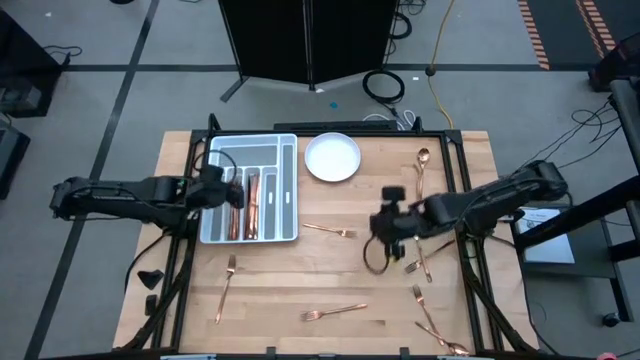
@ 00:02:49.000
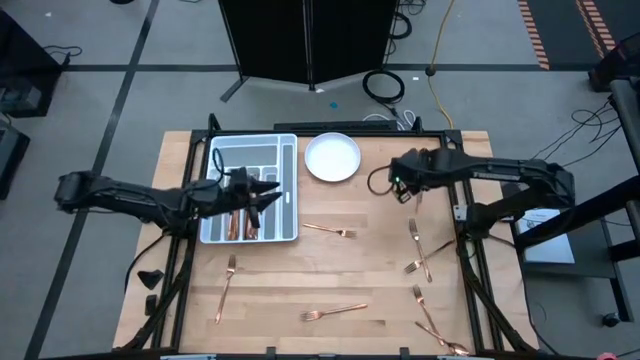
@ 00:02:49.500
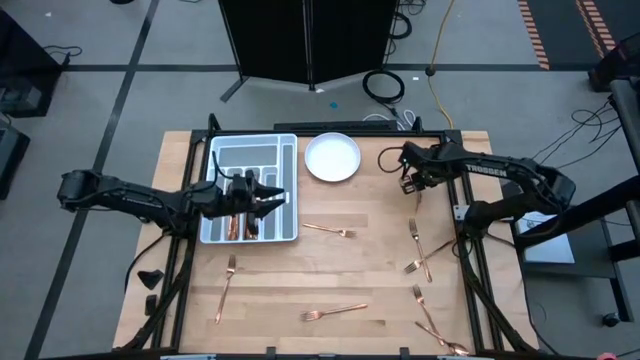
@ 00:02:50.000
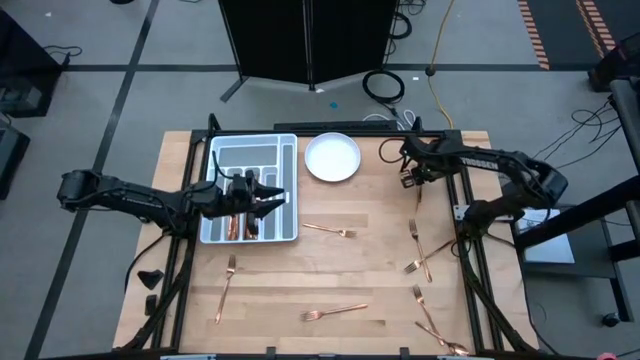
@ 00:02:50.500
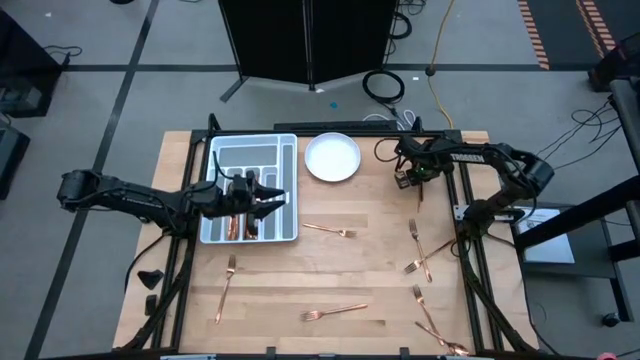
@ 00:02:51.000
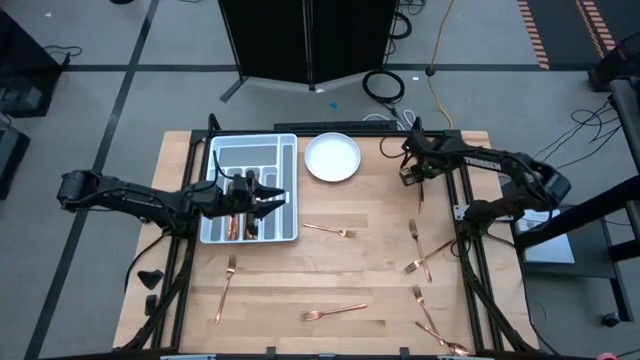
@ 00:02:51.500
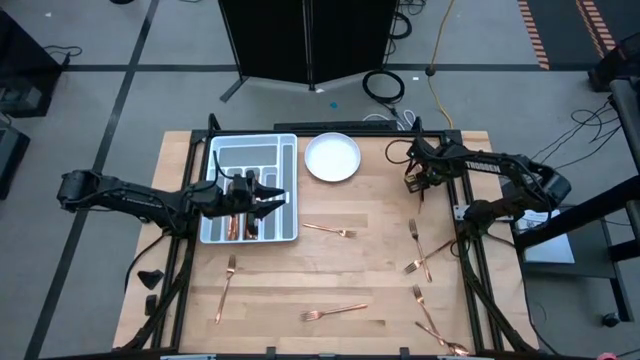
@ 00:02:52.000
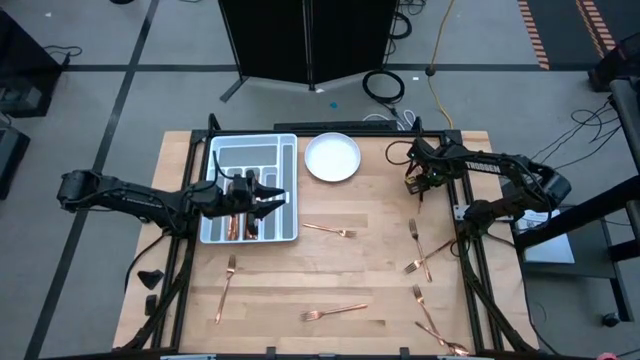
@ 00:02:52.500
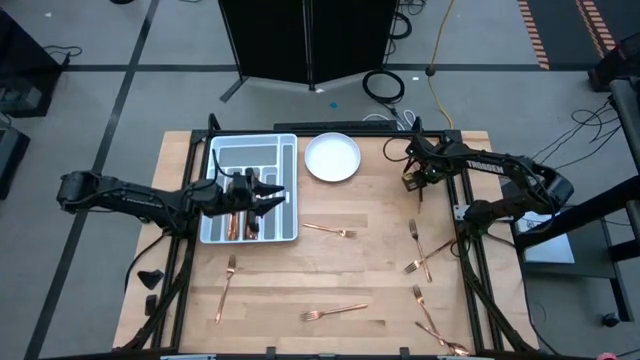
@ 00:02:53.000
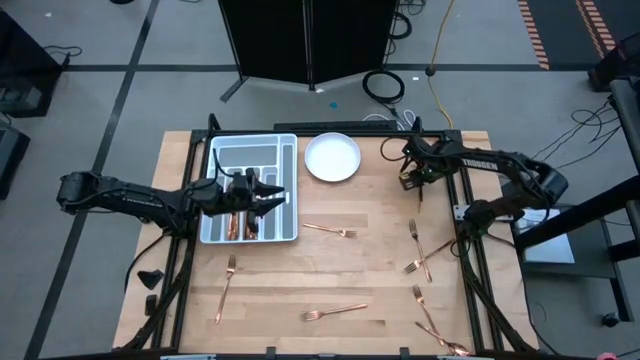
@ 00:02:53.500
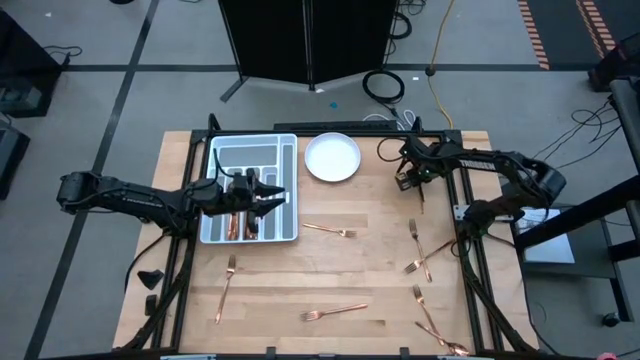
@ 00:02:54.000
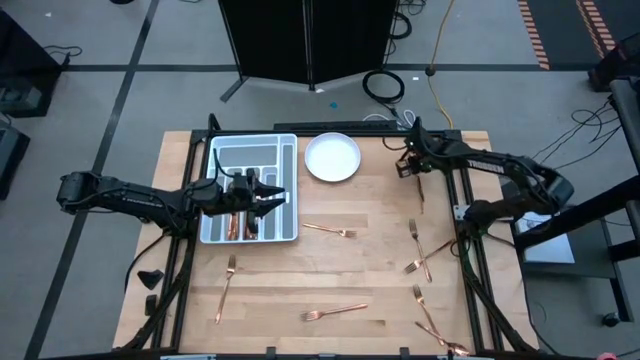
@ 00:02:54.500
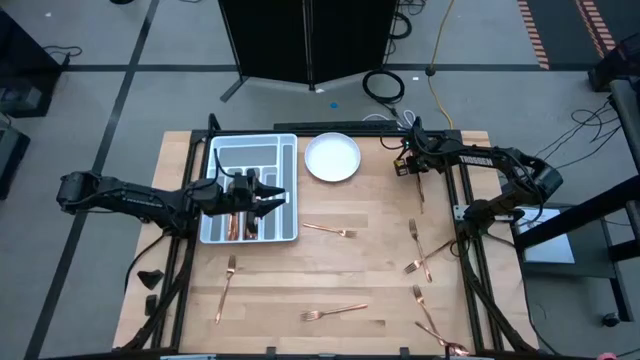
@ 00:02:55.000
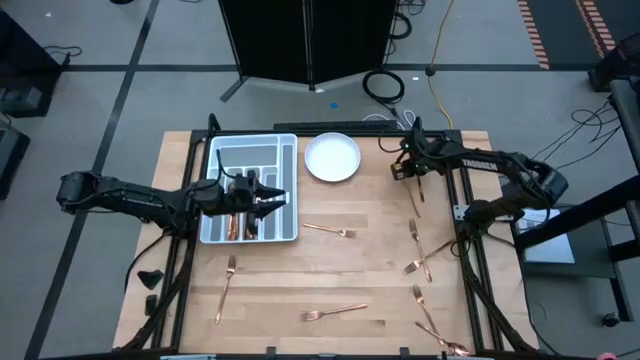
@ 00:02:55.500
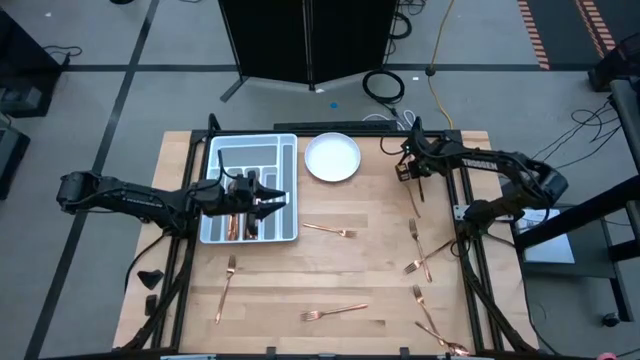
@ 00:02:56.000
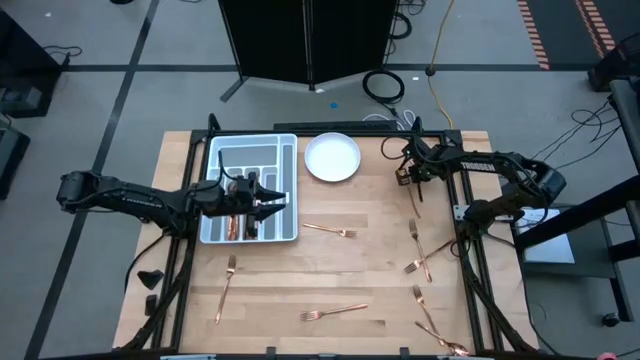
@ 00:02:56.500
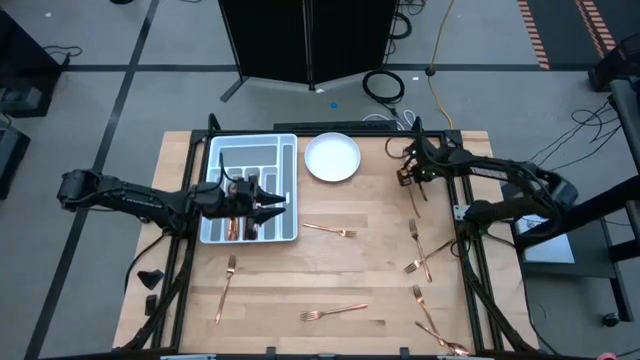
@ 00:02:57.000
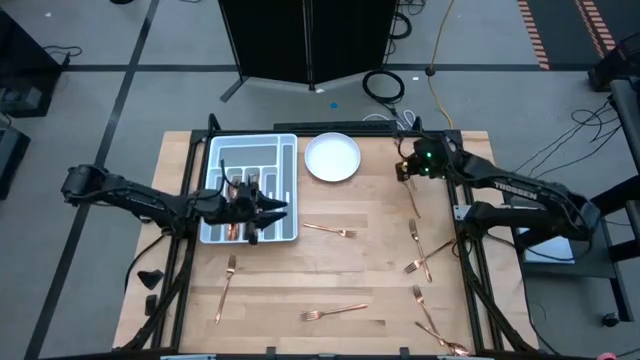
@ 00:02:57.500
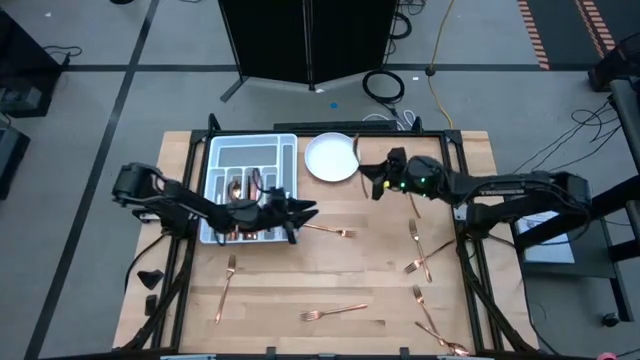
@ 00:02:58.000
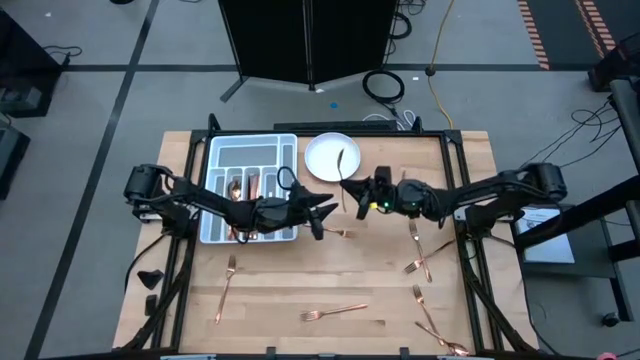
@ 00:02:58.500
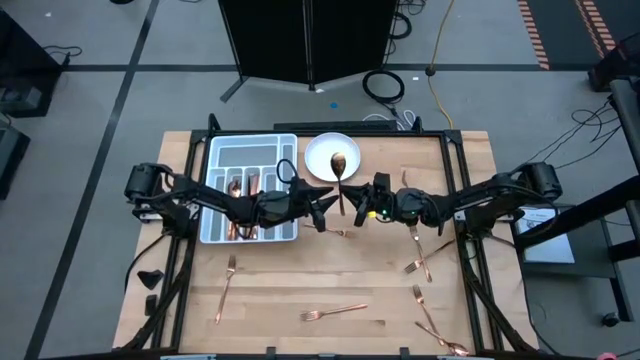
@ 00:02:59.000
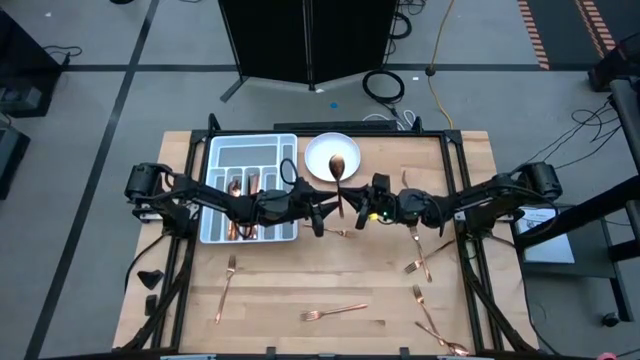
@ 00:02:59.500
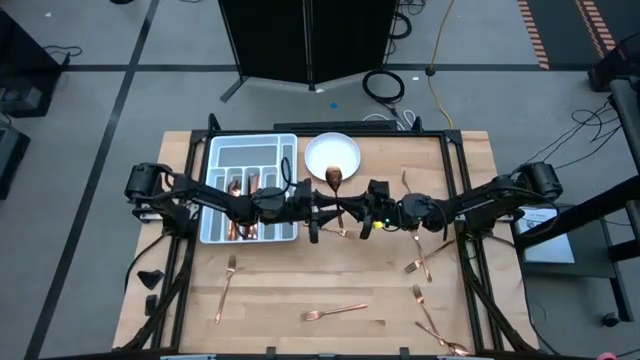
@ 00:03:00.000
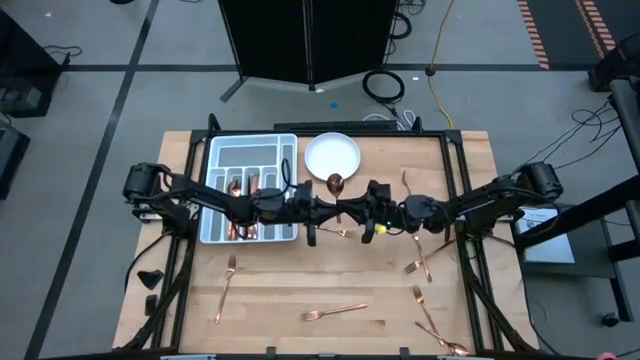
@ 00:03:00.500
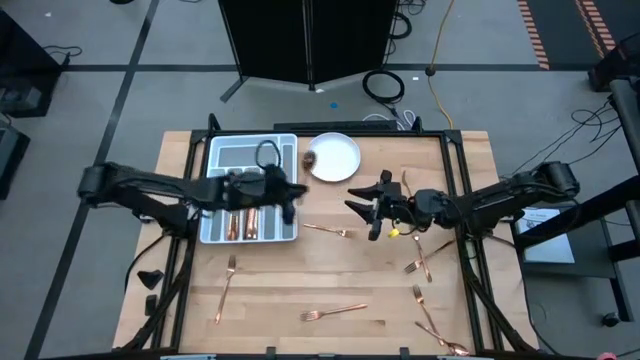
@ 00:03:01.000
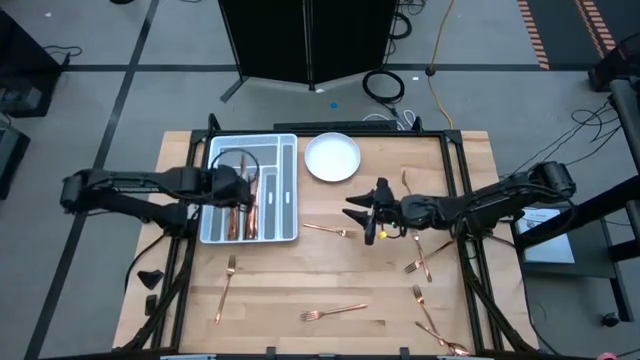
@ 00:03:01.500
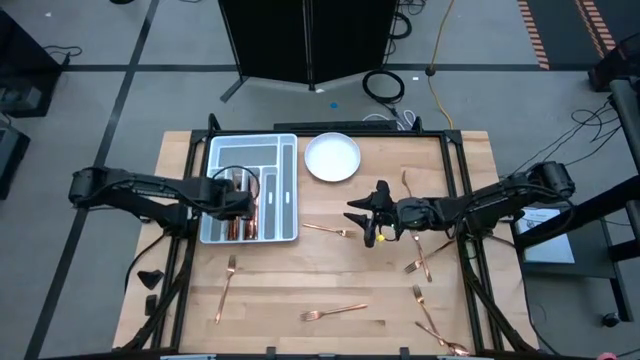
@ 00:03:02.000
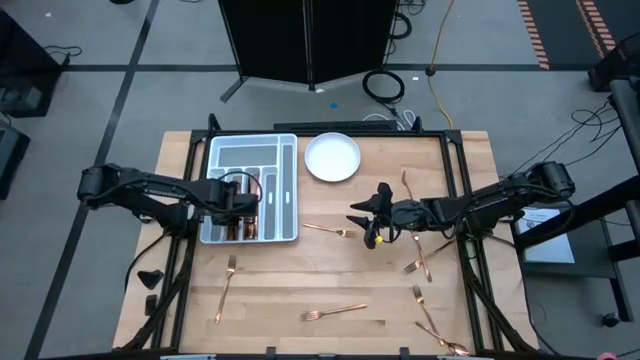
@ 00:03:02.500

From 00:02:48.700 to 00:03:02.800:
Task: Sort silverware
Put the spoon on the silverware tray

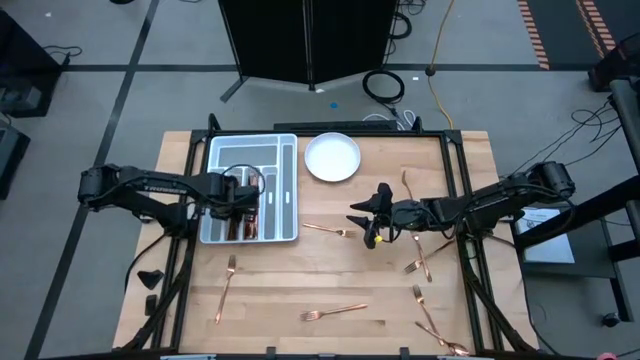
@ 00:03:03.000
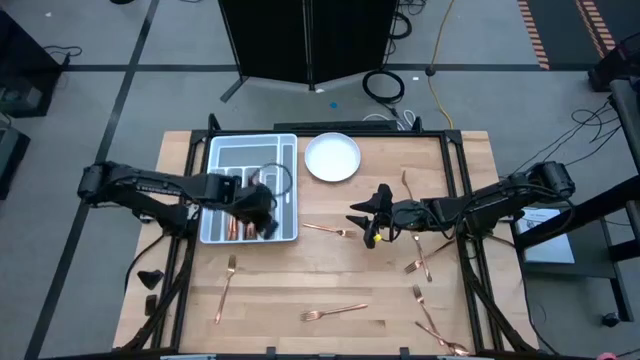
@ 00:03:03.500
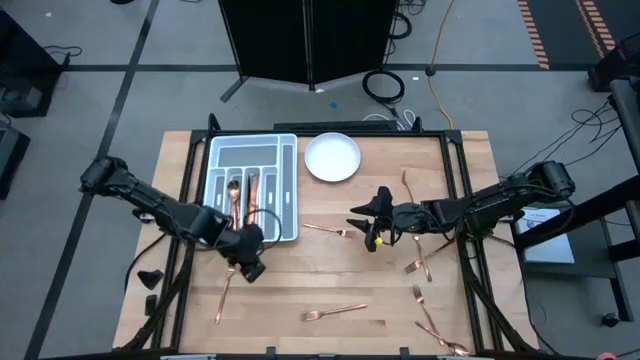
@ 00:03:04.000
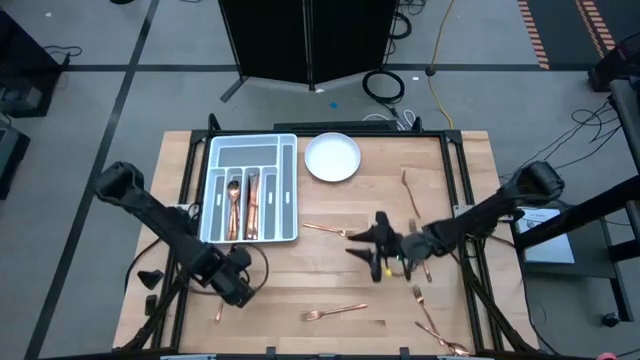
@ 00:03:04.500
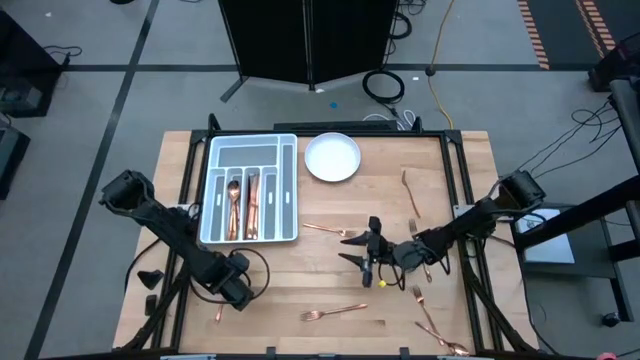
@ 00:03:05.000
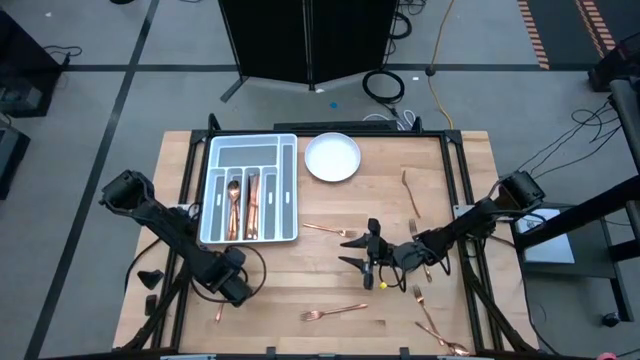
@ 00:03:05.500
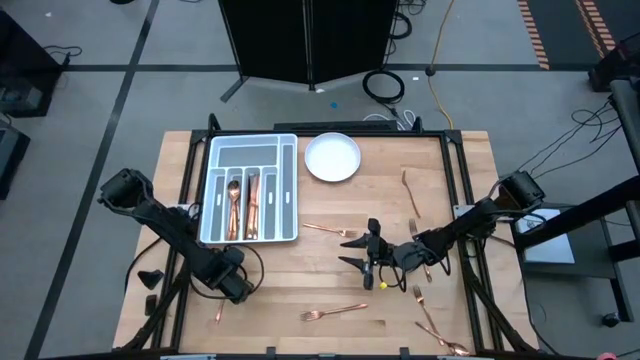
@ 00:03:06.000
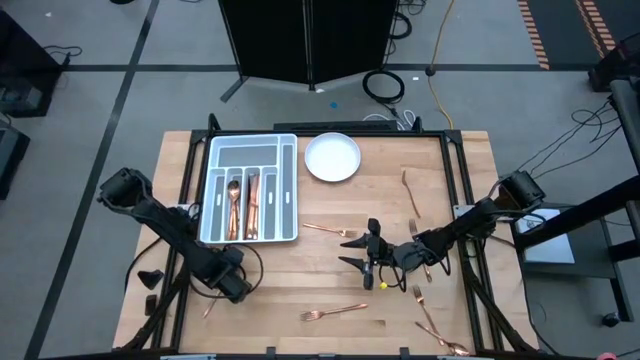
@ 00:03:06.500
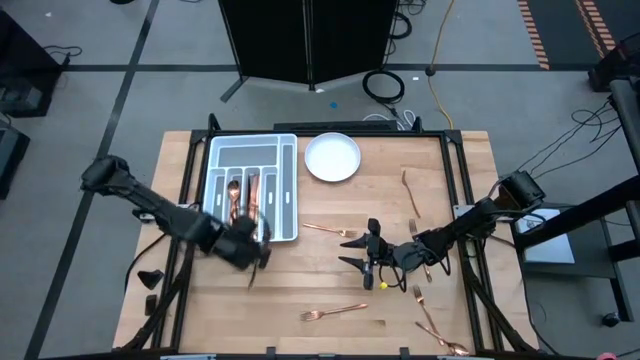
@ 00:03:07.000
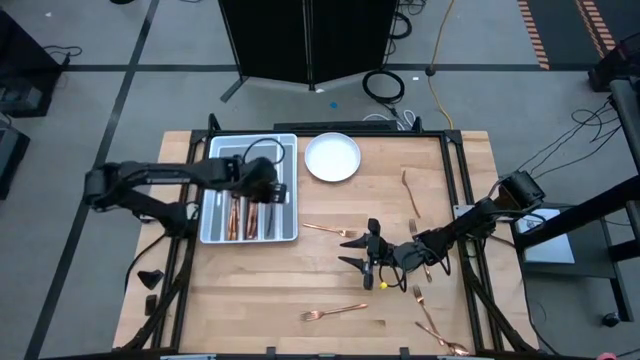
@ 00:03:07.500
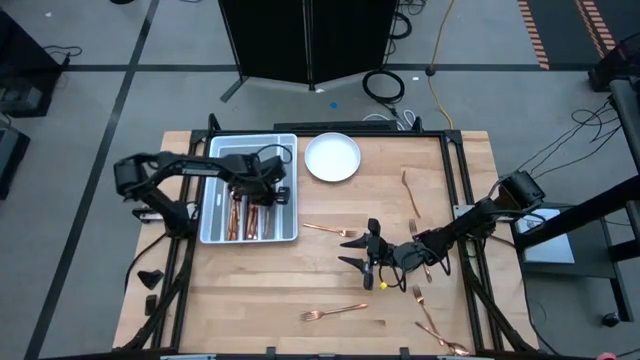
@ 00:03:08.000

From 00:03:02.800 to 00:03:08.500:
Put the fork on the silverware tray

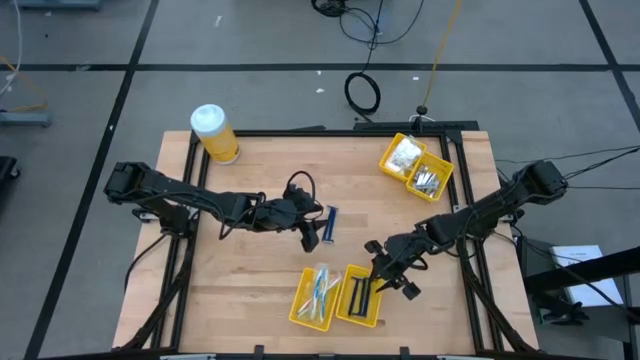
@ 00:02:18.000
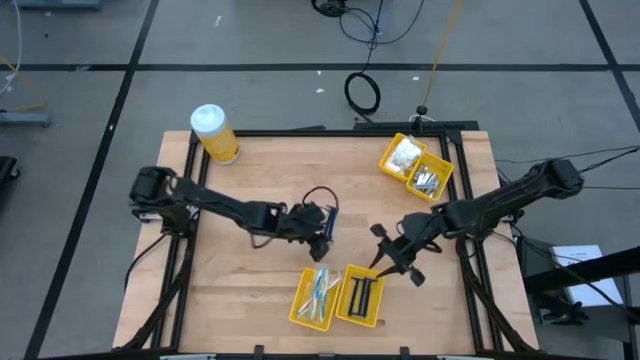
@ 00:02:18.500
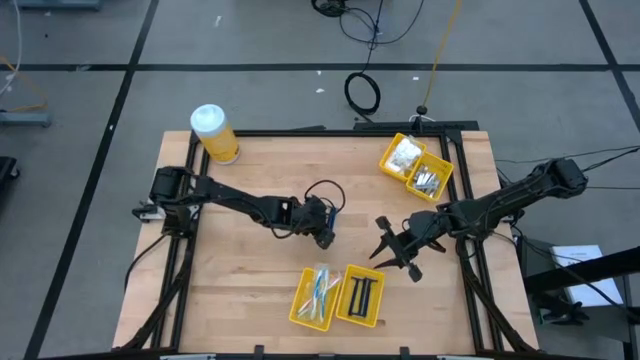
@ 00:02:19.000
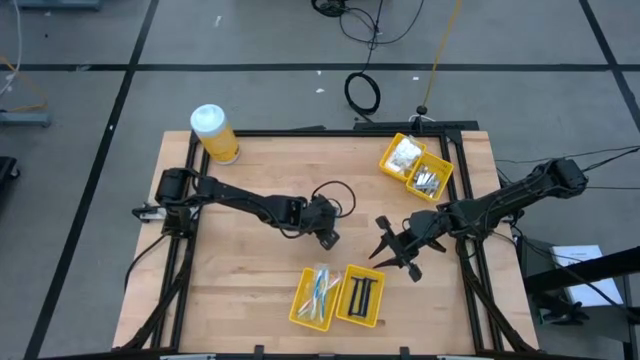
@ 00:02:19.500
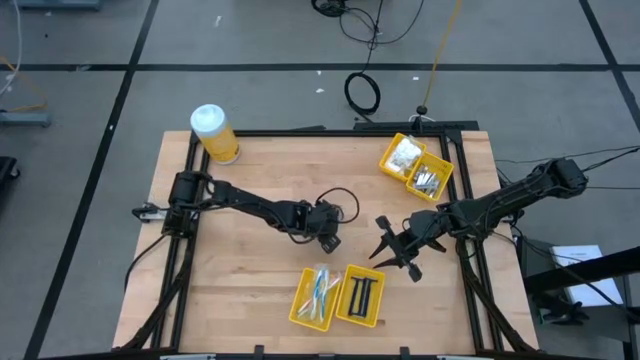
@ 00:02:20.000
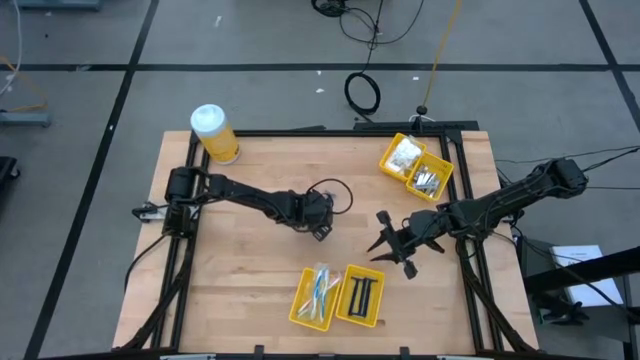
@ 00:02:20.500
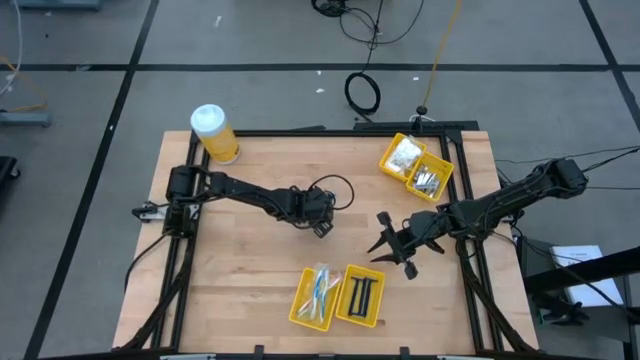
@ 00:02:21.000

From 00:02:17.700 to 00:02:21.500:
Task: Pick & Place Travel size toiletries
Put the blue rolled gauze into the bottom right yellow bin
